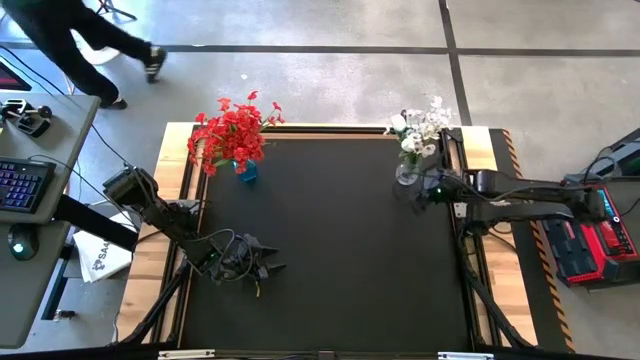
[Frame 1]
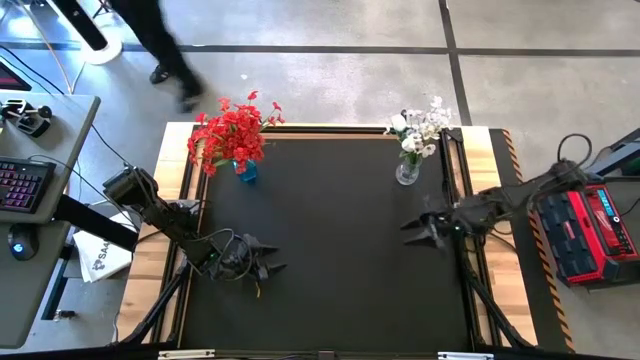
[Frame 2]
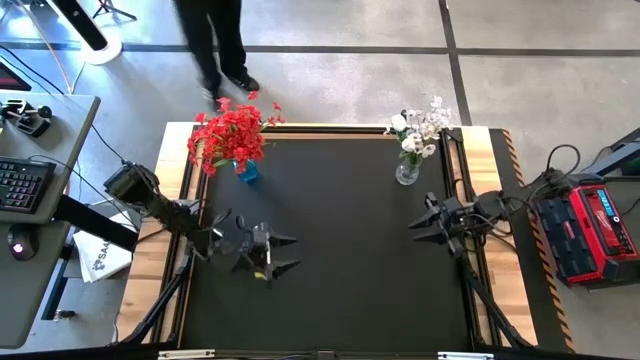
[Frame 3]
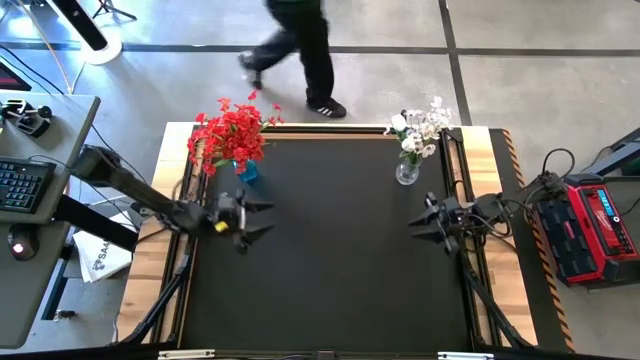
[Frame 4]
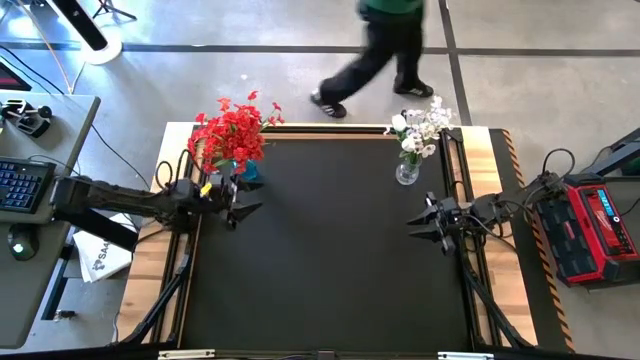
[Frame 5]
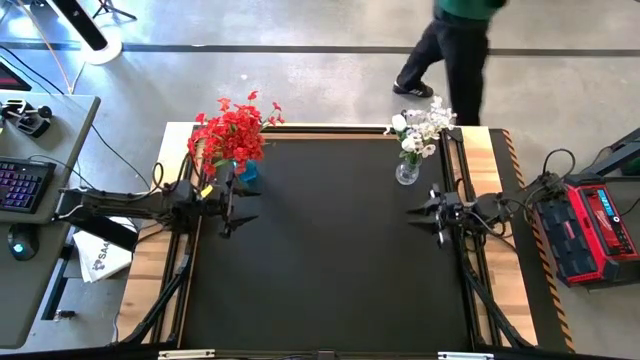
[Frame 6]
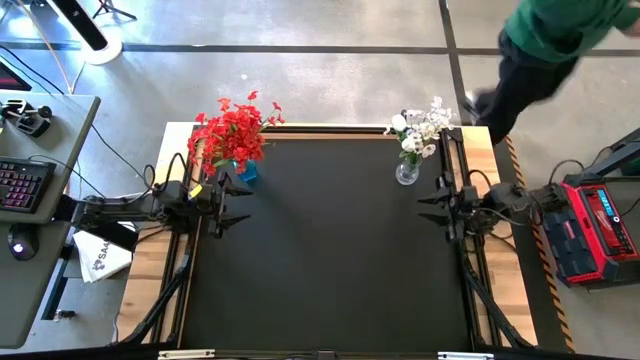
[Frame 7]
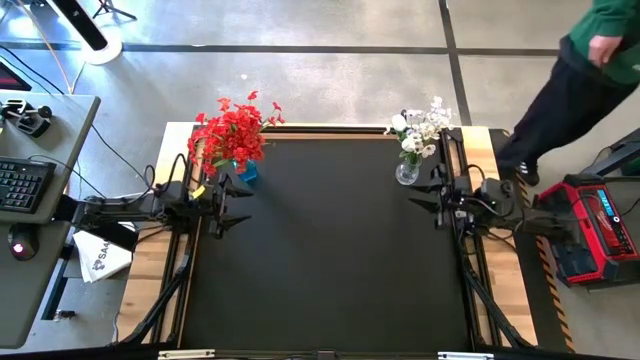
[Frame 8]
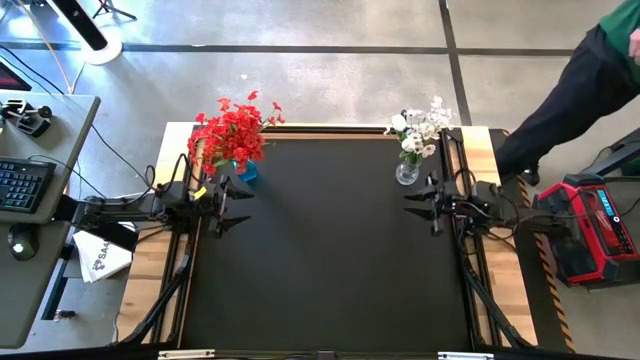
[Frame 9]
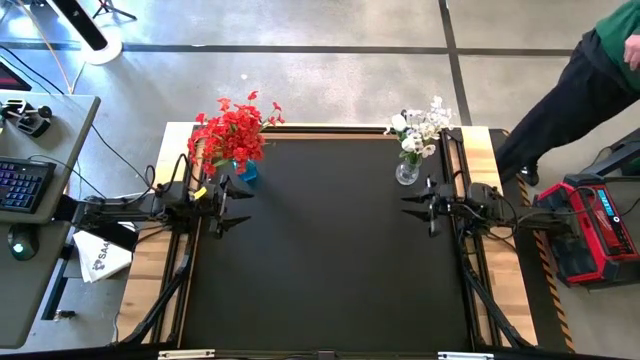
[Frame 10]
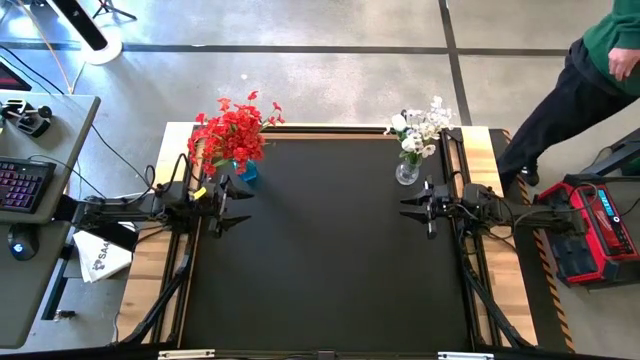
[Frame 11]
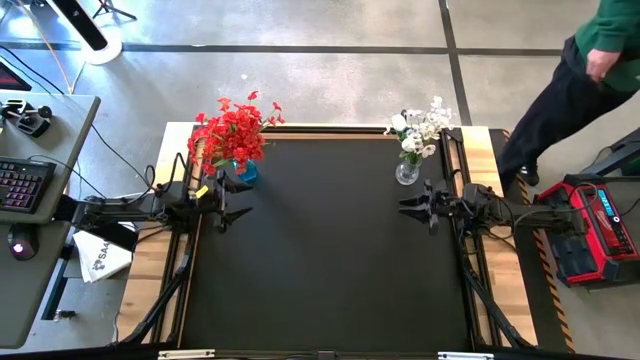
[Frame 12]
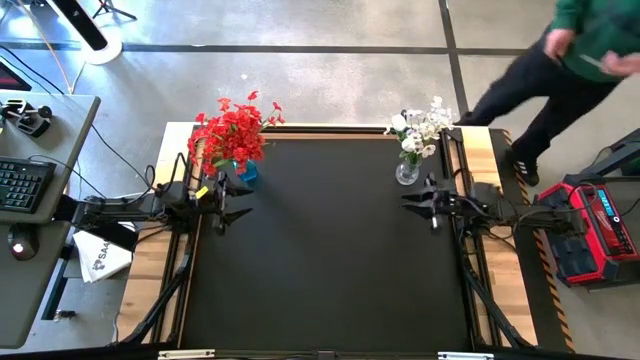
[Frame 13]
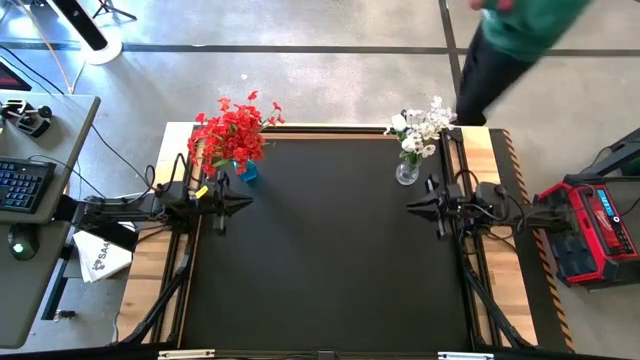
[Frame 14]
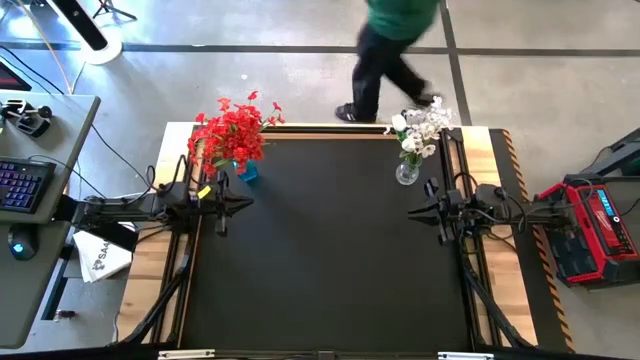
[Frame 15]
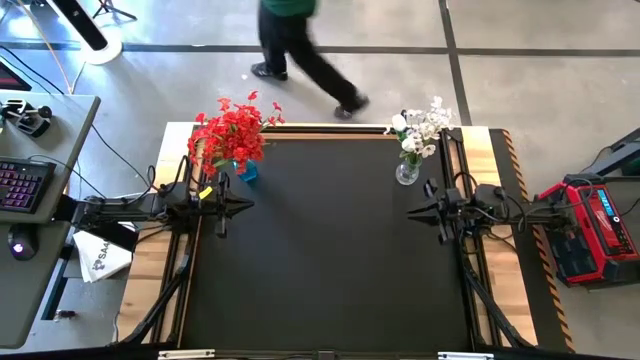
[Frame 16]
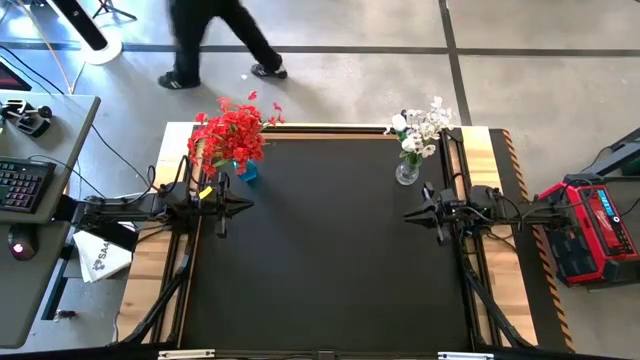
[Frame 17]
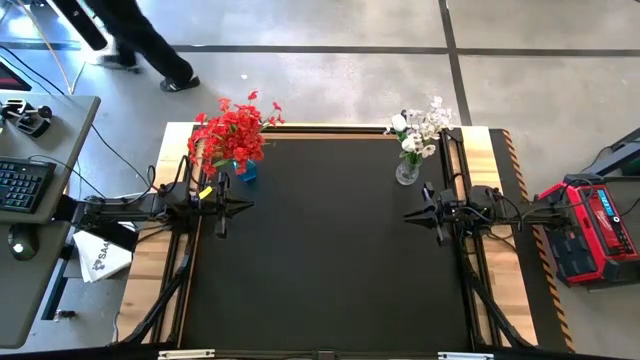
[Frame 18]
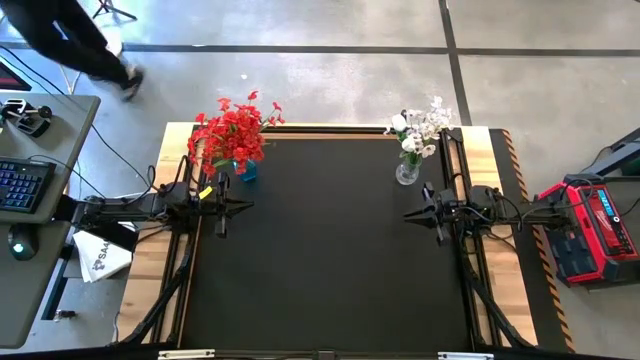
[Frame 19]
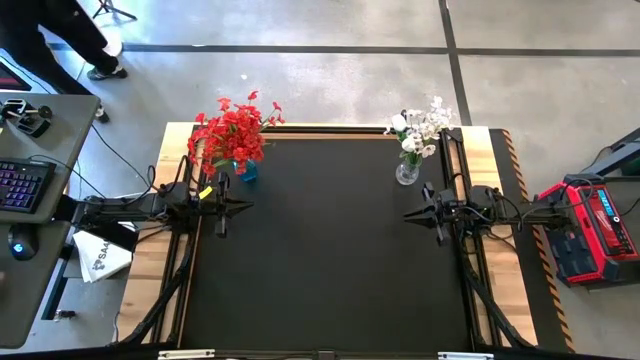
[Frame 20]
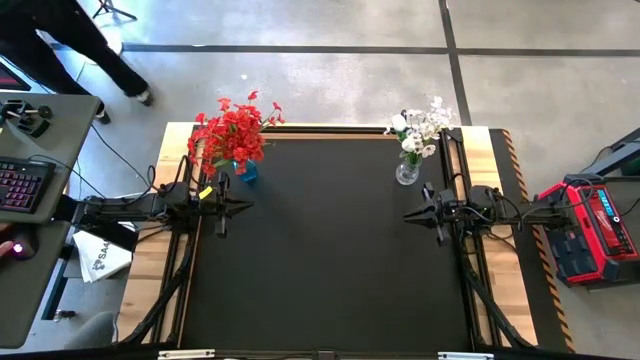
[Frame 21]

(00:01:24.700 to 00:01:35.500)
Task: Sort flowers into vase by color
Return to Home Position

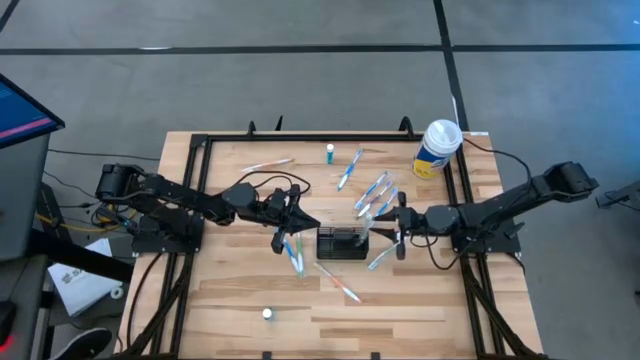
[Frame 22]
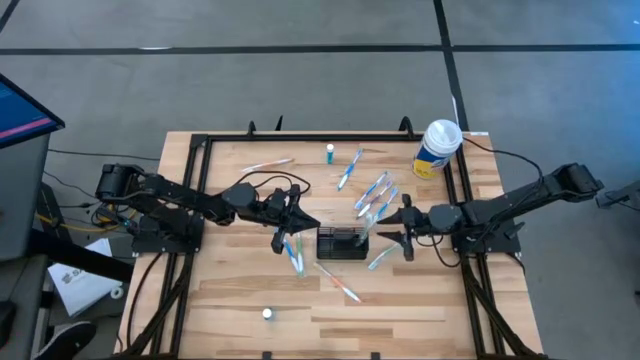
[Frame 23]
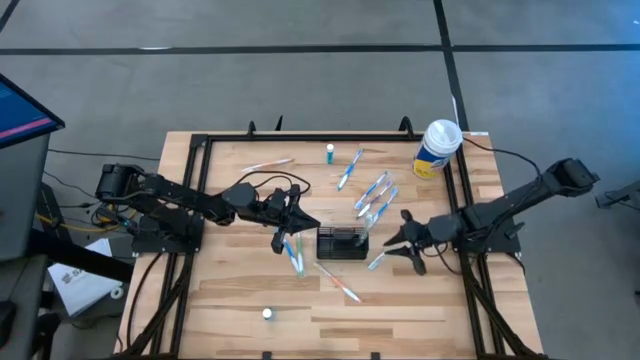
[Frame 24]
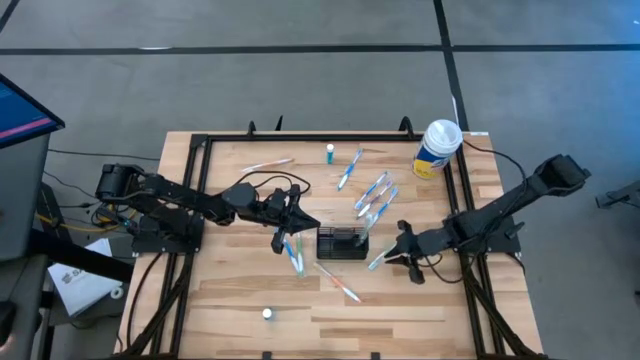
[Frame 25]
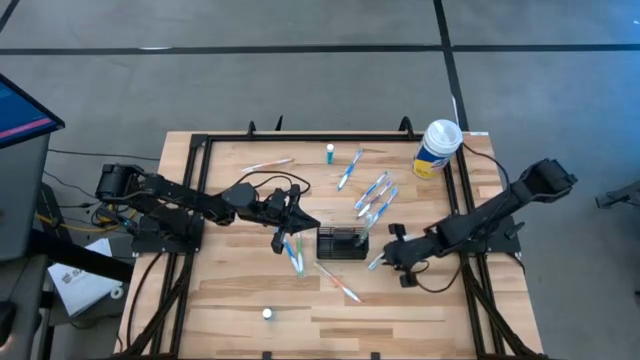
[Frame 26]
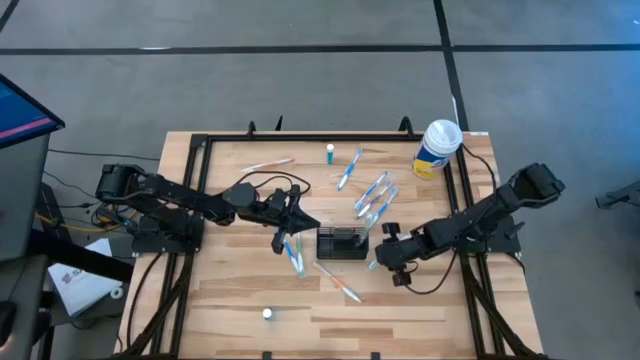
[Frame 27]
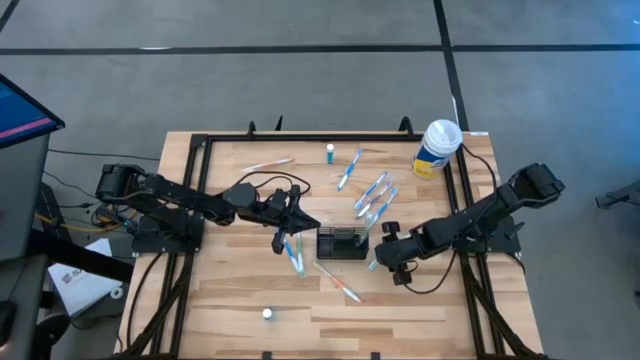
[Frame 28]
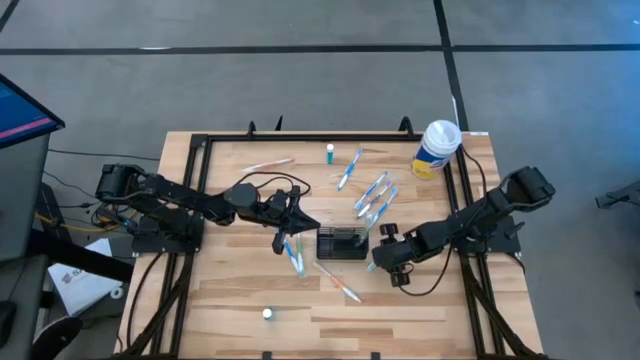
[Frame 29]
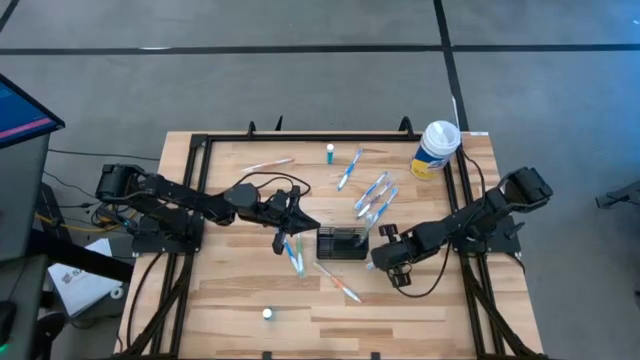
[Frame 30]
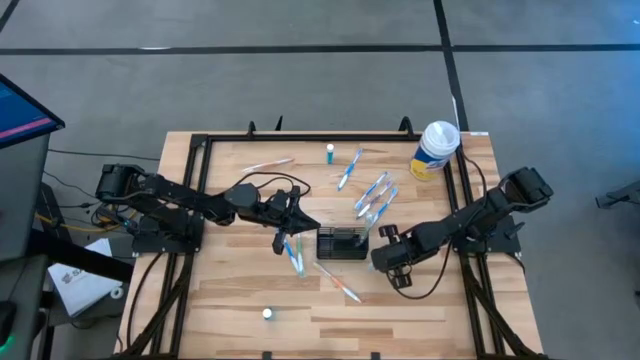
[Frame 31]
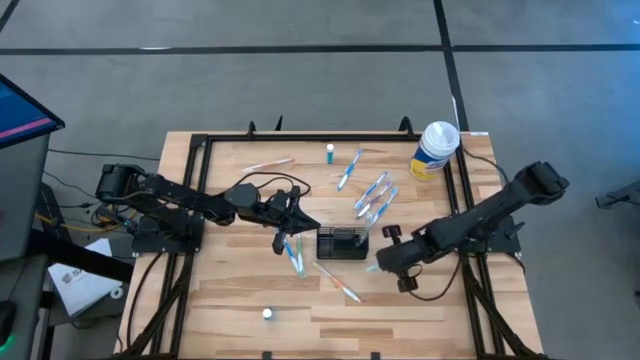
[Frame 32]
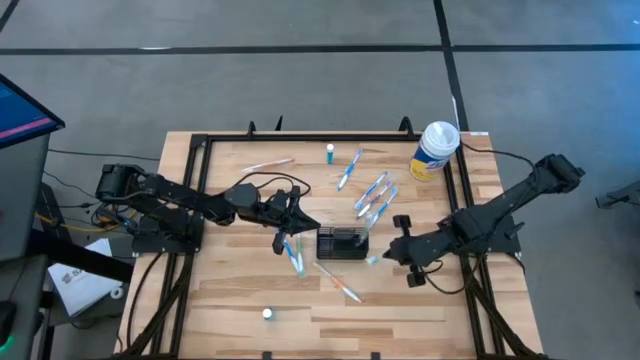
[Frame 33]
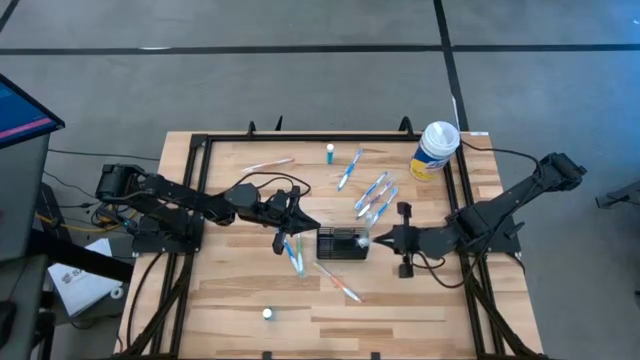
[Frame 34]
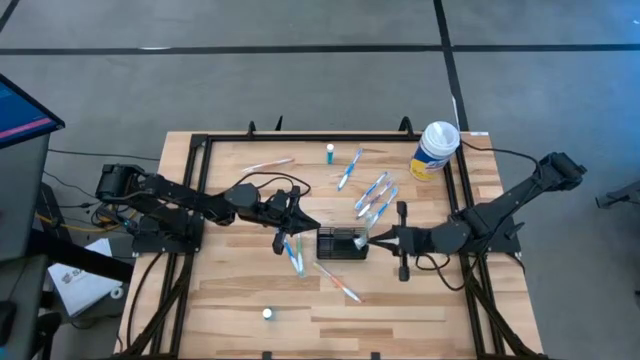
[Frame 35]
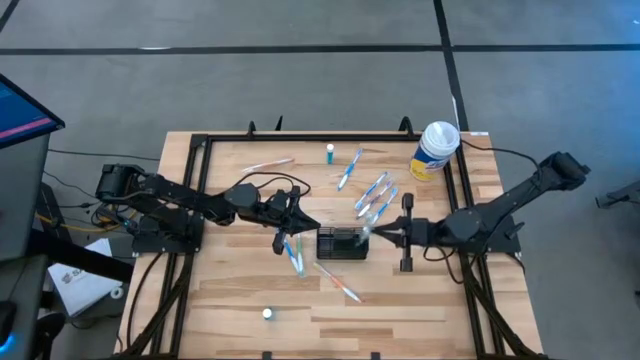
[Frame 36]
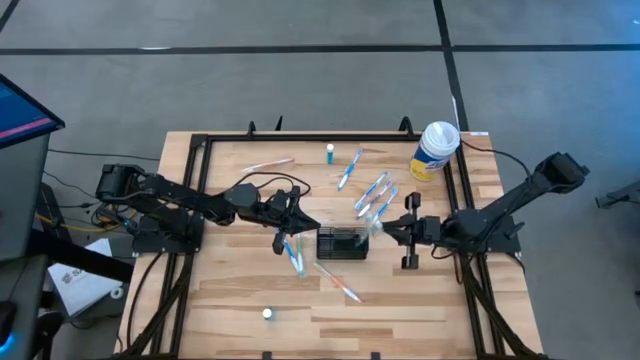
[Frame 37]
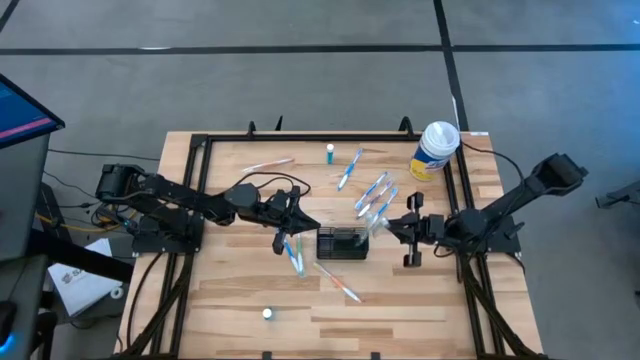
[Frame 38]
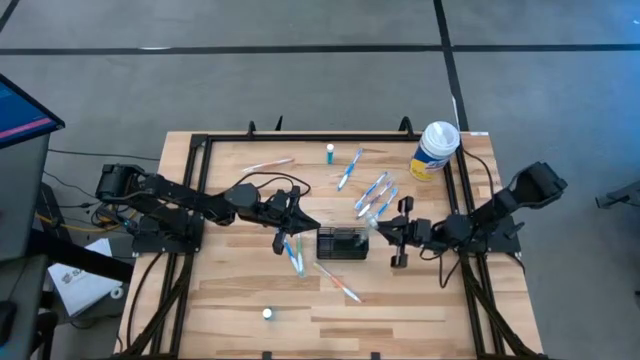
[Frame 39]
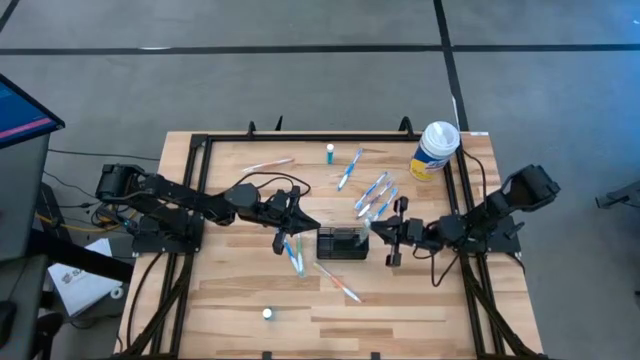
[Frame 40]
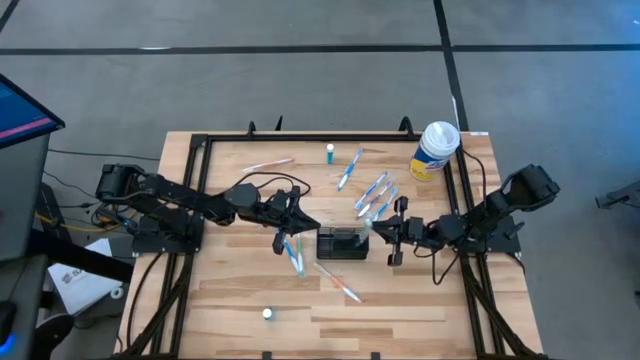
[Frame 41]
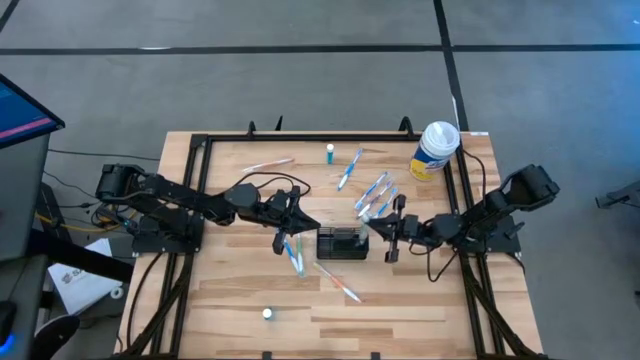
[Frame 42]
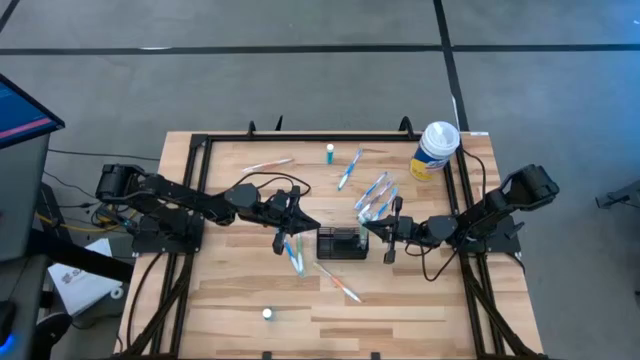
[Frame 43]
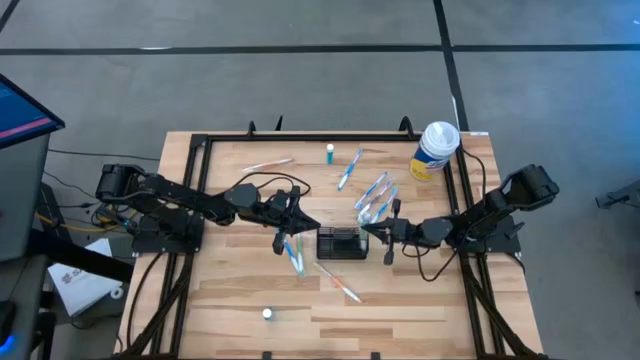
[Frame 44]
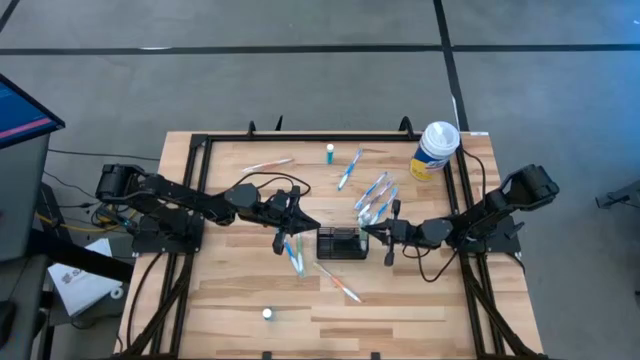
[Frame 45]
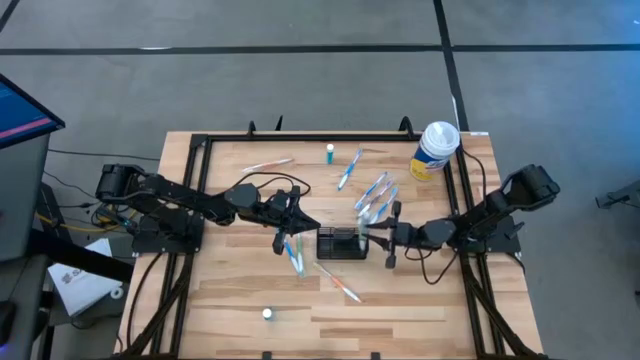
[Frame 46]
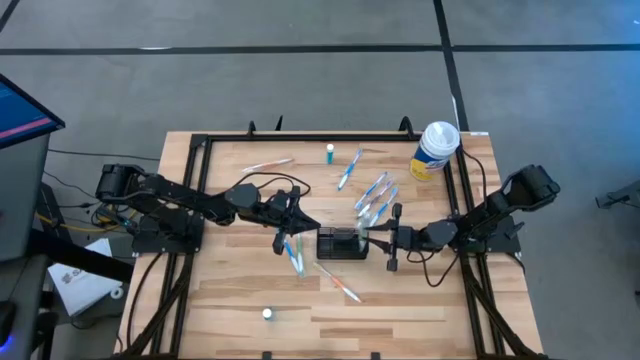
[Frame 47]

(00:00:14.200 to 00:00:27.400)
Task: Pick & Place toothbrushing station
Put the green toothbrush into the wire organizer
